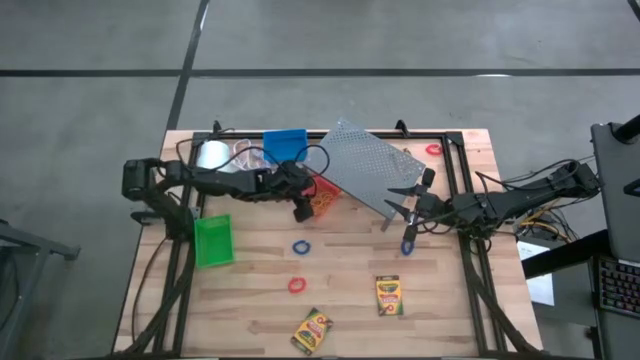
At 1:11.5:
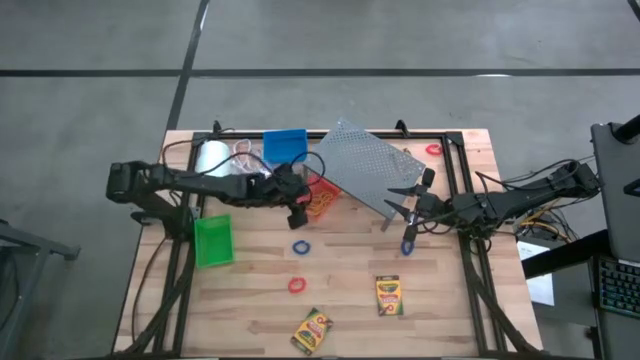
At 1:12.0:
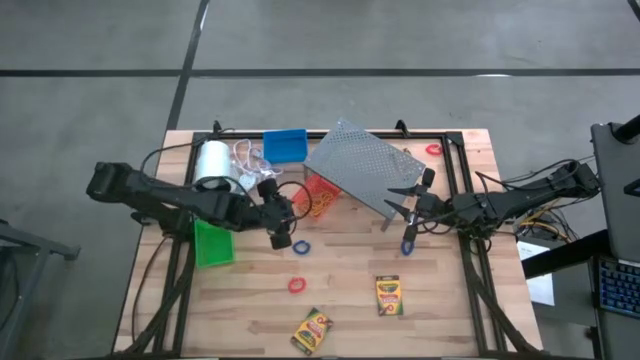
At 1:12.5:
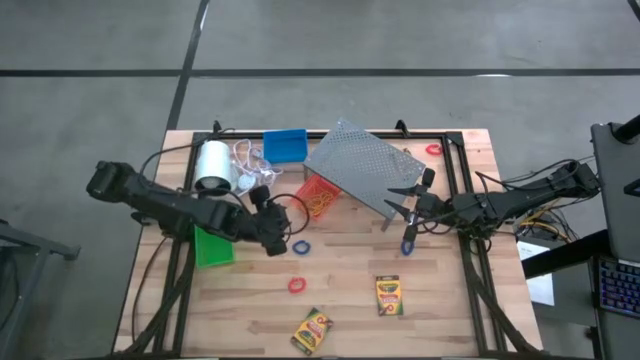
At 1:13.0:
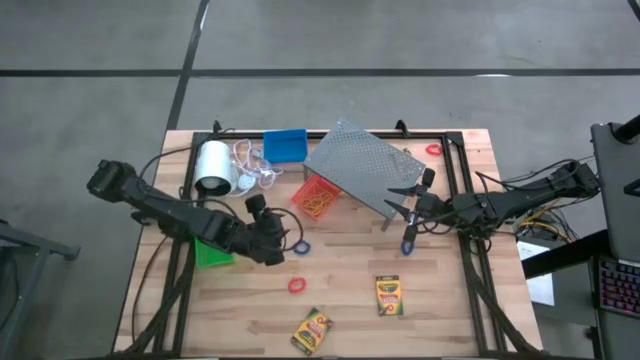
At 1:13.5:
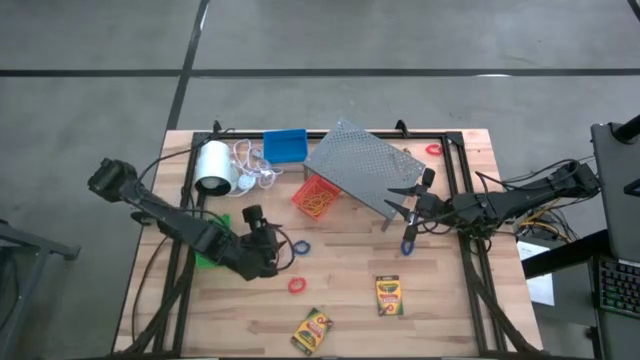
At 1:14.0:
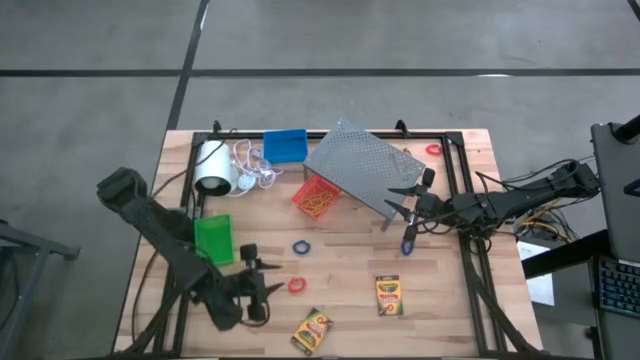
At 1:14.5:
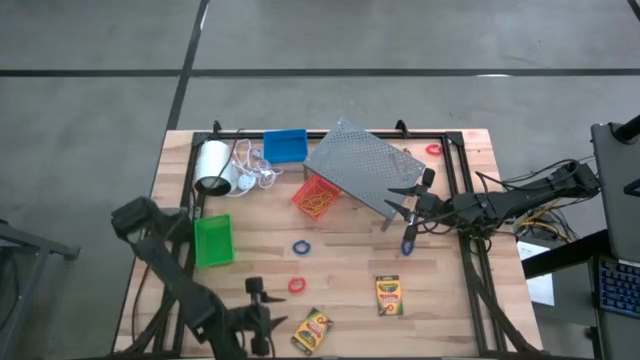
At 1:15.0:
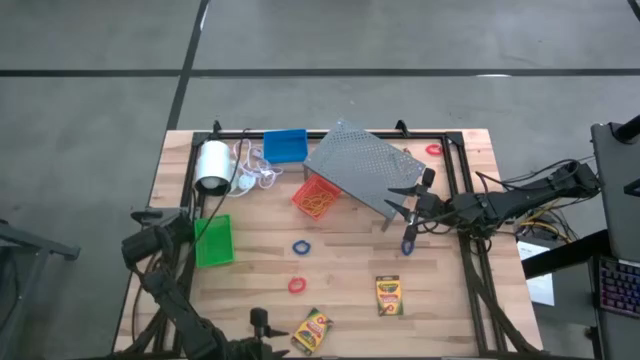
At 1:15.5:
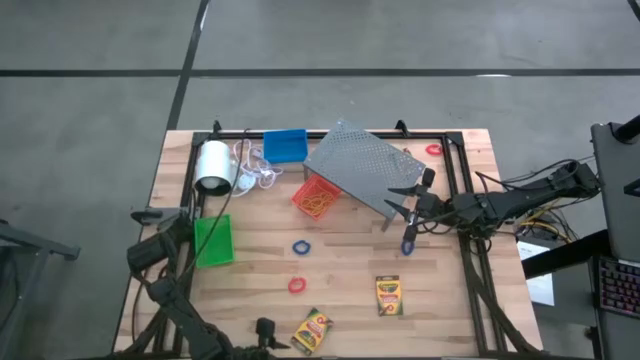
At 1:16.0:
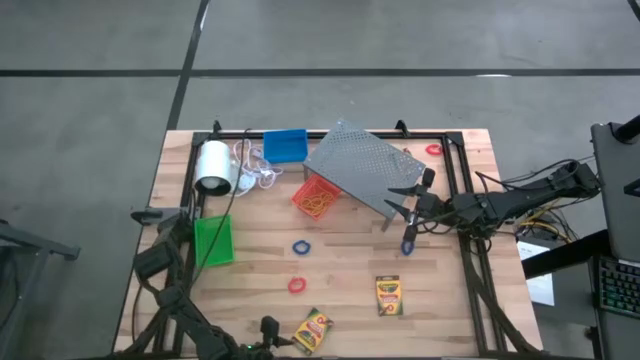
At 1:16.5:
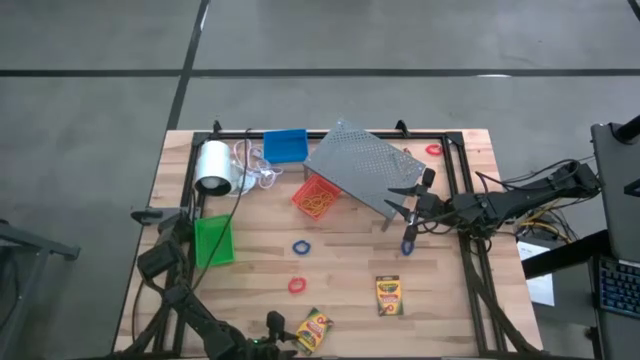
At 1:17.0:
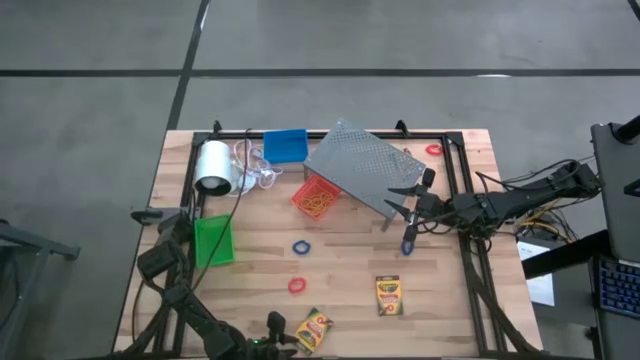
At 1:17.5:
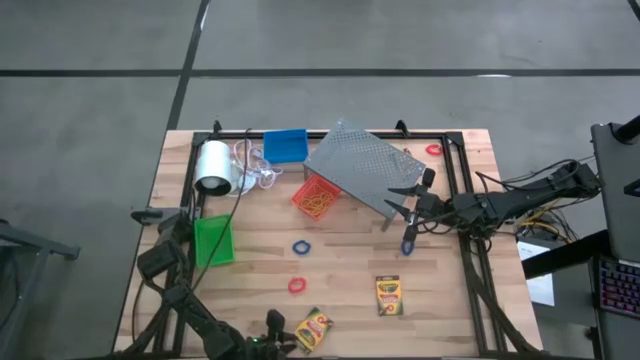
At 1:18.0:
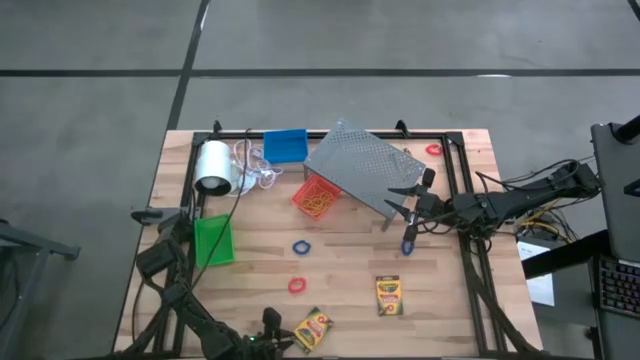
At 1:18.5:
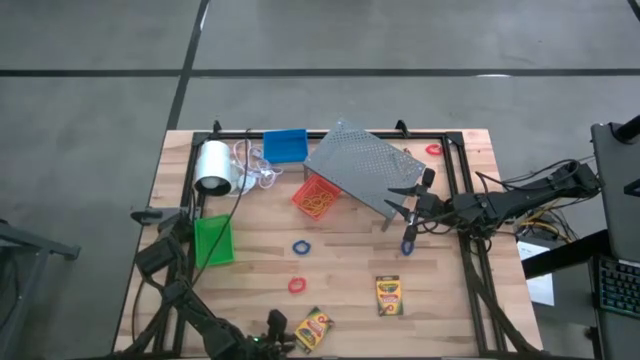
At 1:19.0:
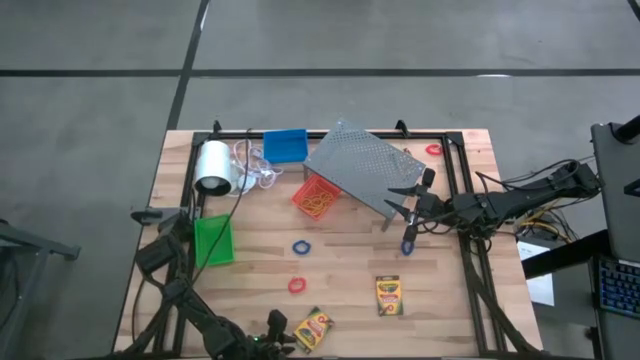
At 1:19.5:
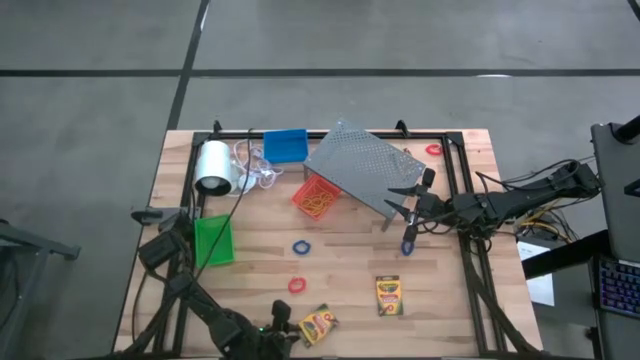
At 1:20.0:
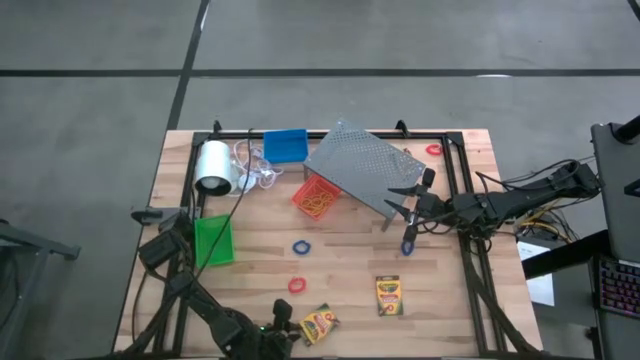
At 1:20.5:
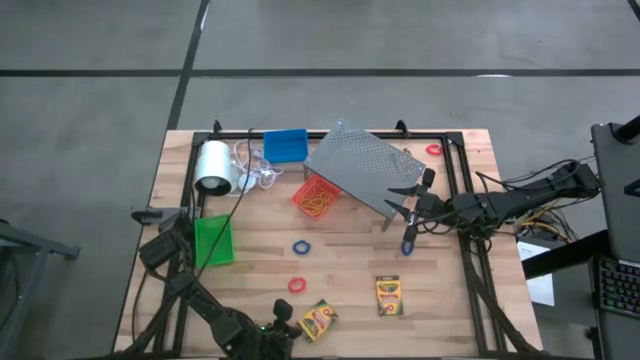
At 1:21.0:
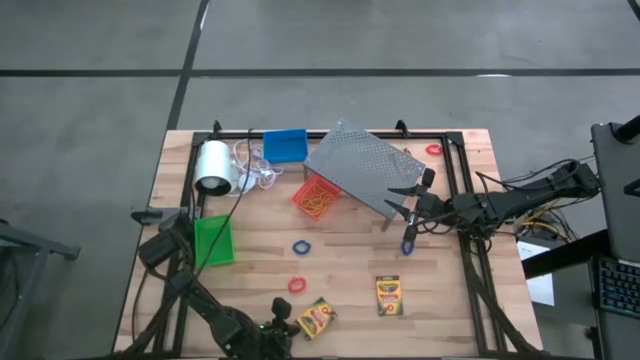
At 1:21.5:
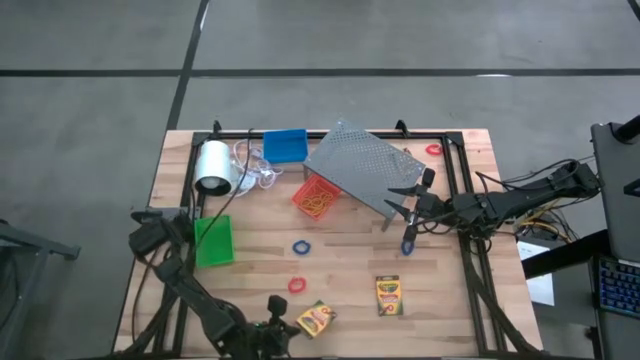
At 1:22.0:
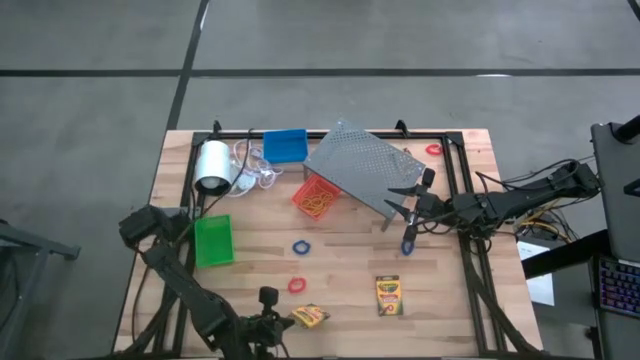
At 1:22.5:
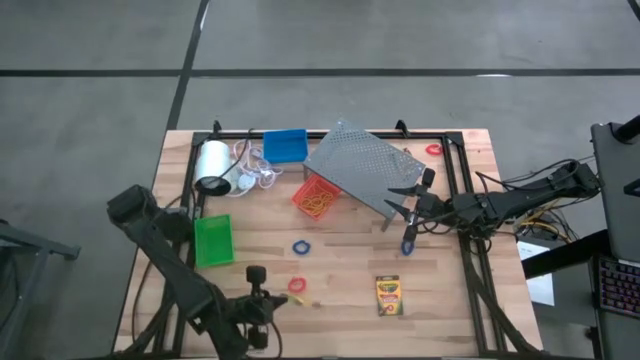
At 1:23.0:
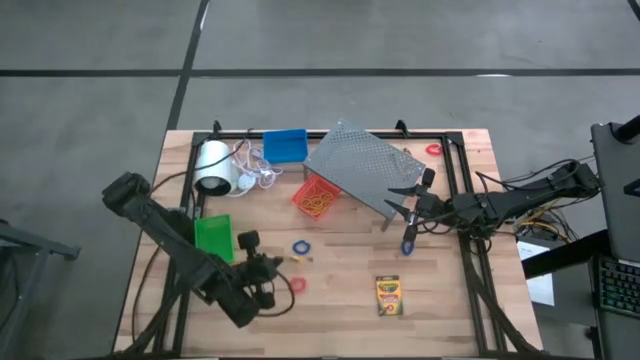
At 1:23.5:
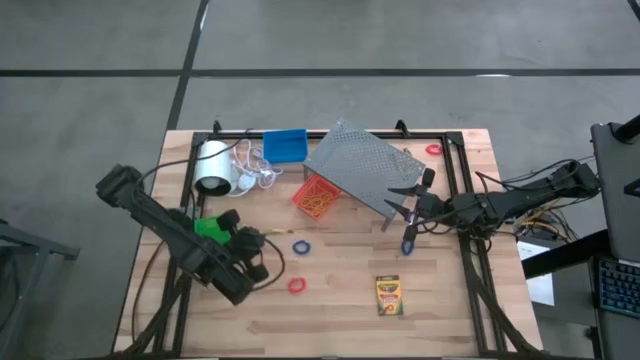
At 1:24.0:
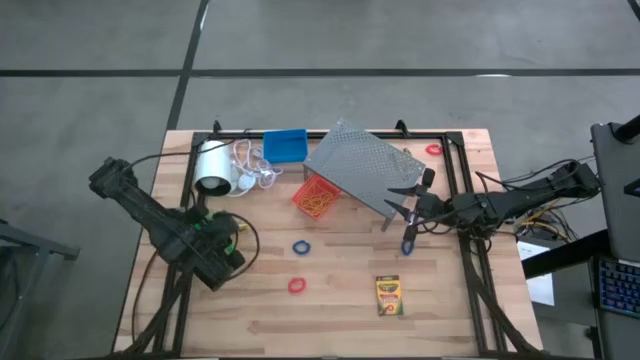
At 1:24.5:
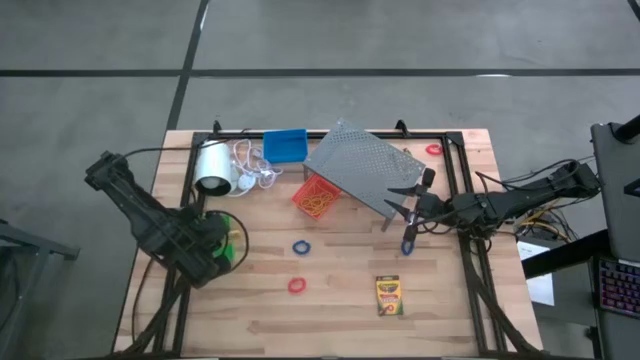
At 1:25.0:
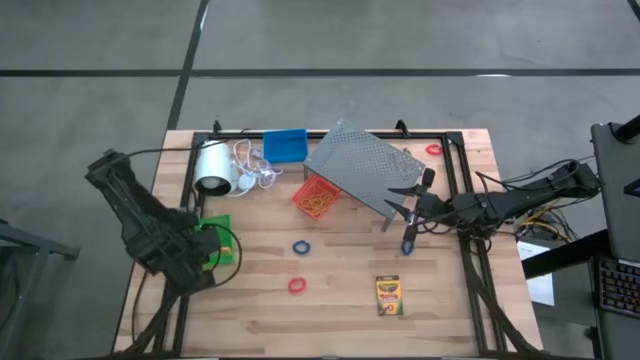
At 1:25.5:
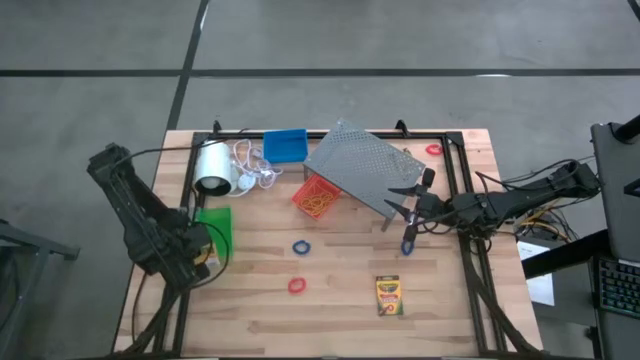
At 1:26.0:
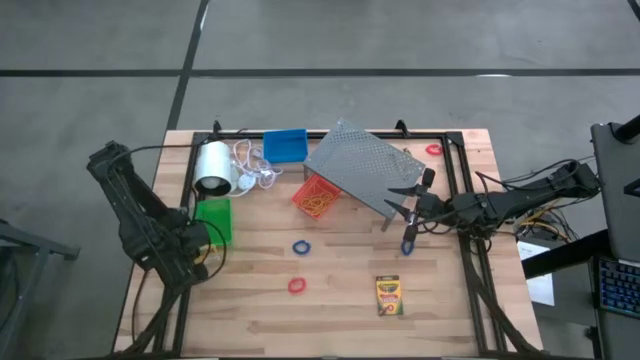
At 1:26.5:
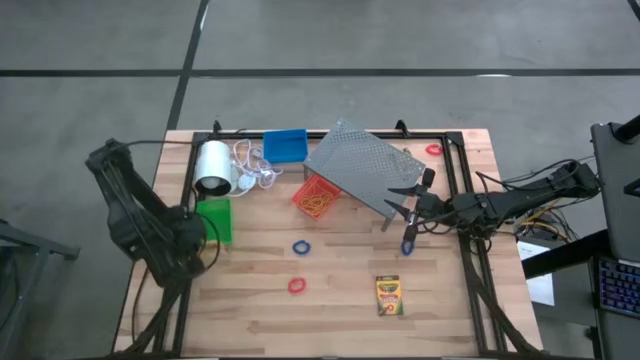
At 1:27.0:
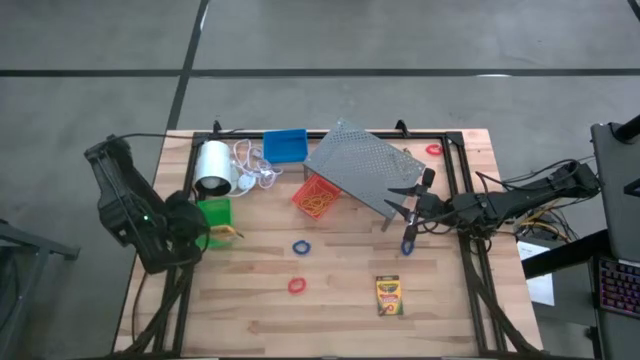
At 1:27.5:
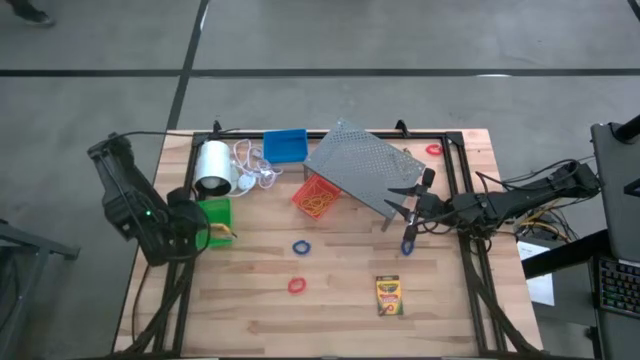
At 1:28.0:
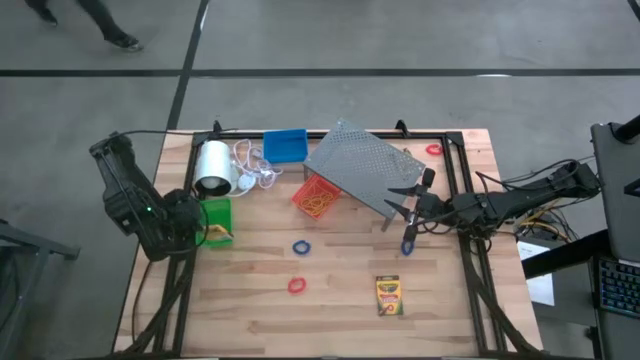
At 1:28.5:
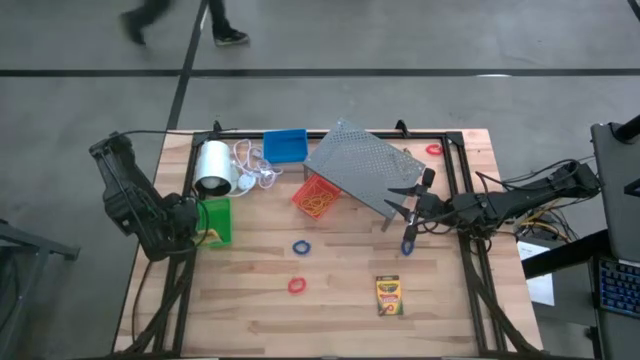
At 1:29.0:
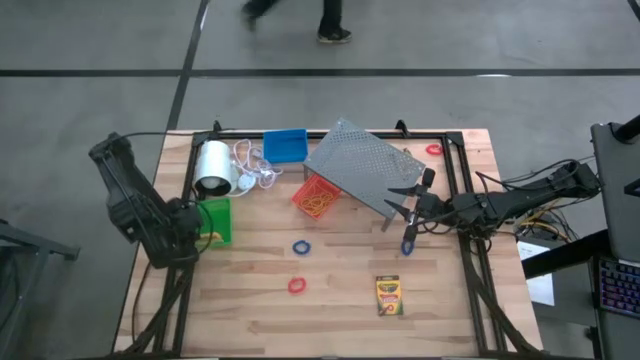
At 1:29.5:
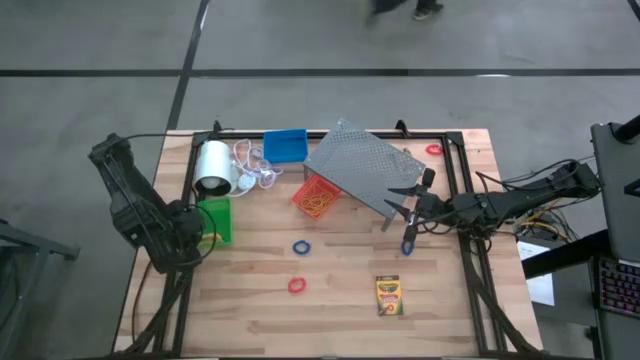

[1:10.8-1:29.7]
Task: Pick & Place Office Desk Supplies
Put the crayon box into the green bin

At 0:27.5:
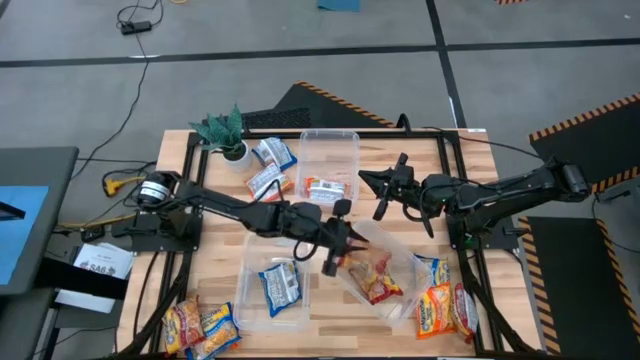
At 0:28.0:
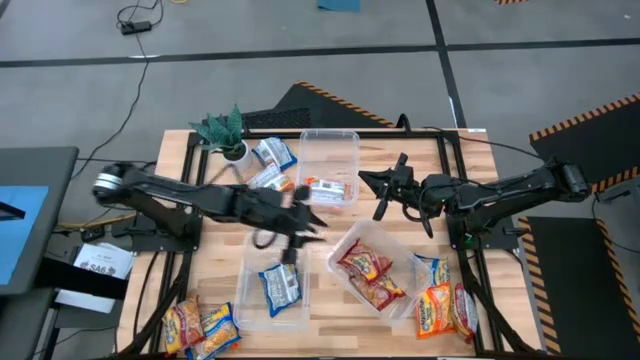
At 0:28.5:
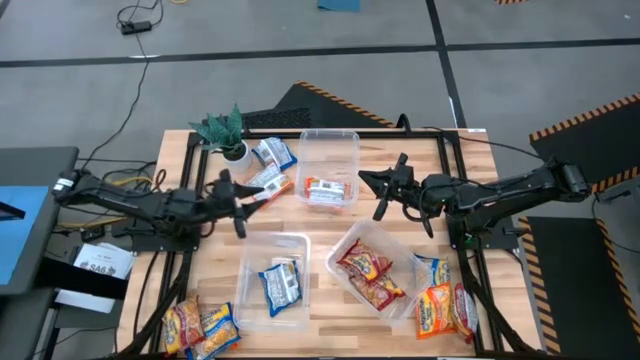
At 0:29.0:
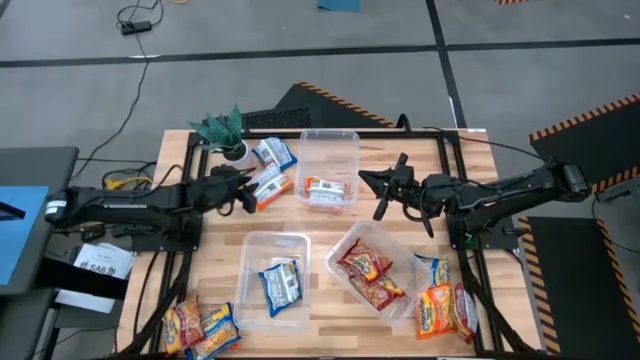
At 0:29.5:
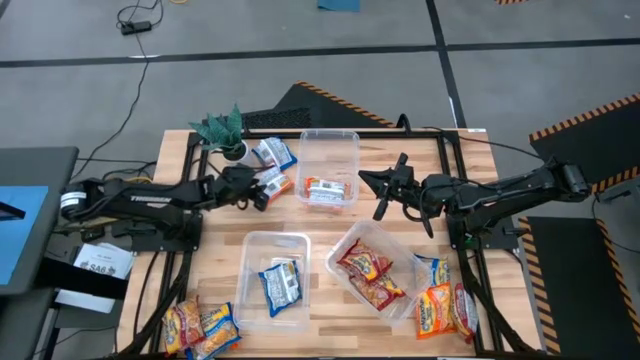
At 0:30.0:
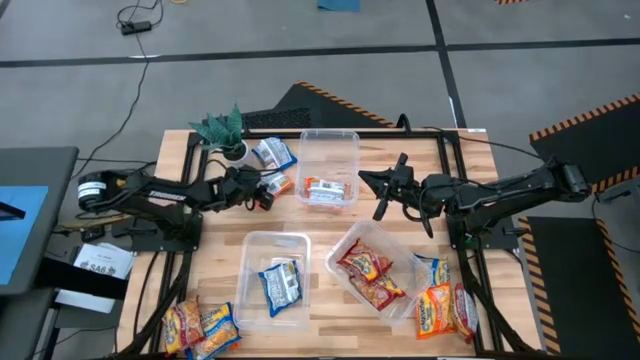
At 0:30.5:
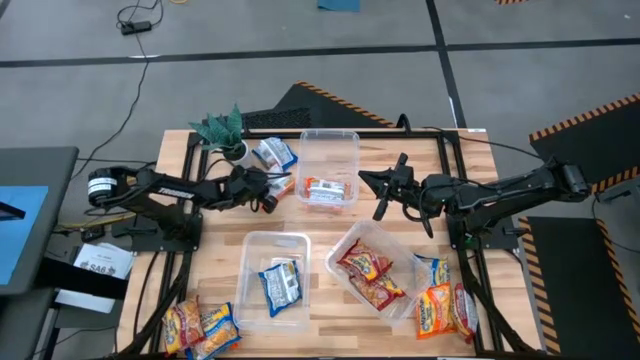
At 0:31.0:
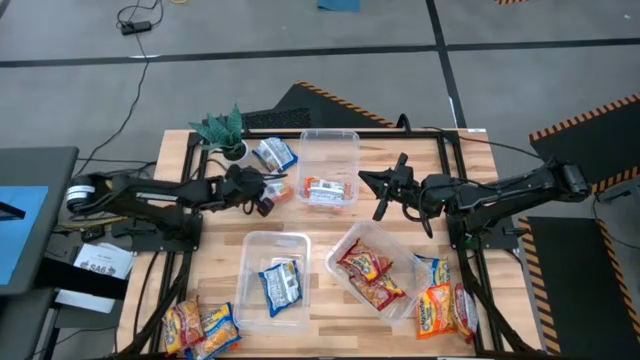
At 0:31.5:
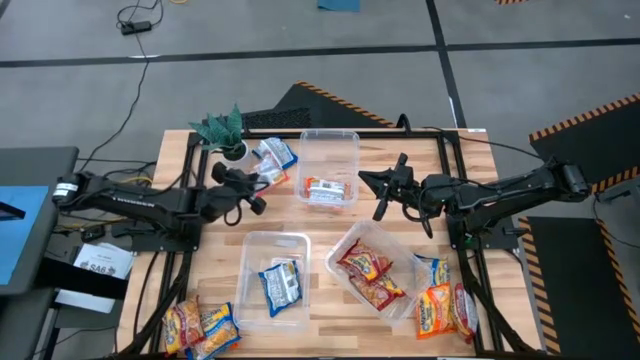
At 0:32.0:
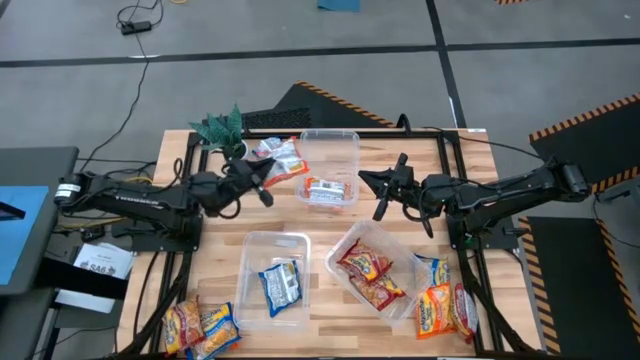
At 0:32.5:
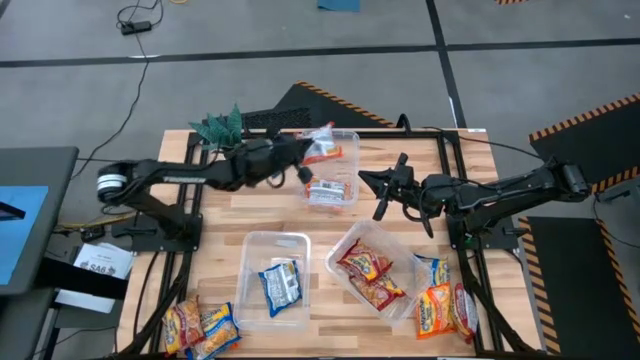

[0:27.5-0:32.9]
Task: Sort Maruchan noodles
Put the orange noodle pack into the top transparent bin
